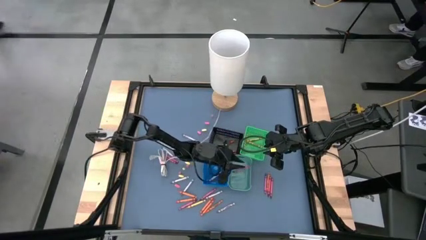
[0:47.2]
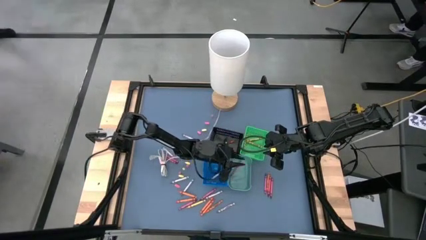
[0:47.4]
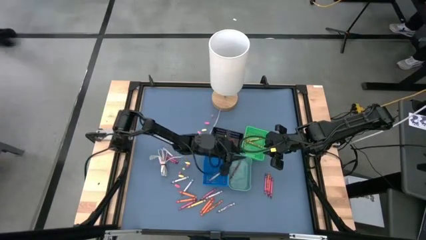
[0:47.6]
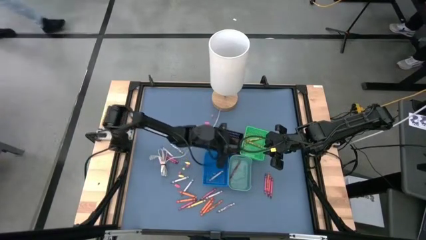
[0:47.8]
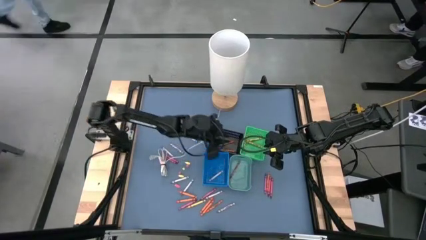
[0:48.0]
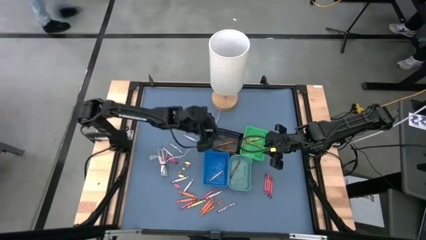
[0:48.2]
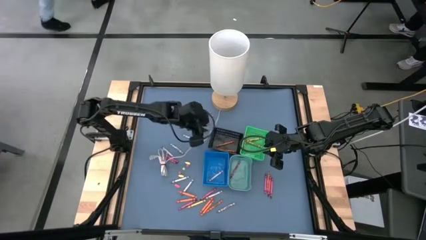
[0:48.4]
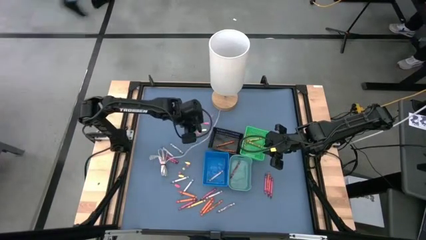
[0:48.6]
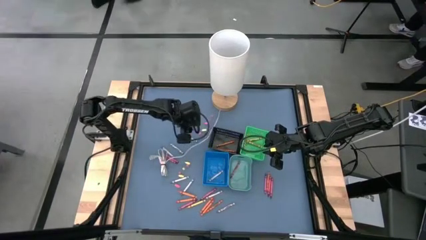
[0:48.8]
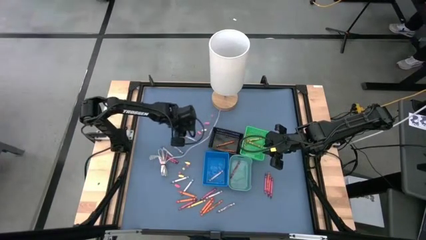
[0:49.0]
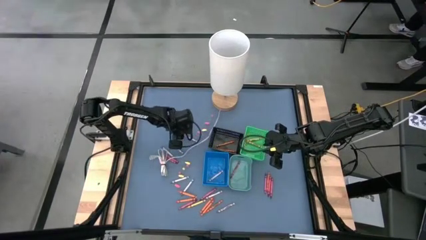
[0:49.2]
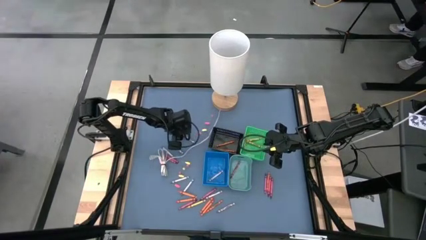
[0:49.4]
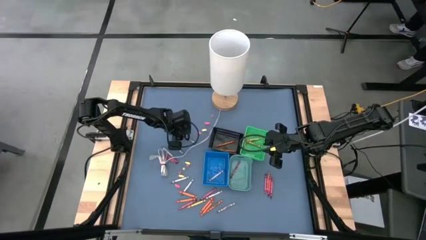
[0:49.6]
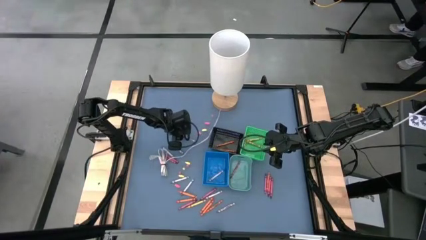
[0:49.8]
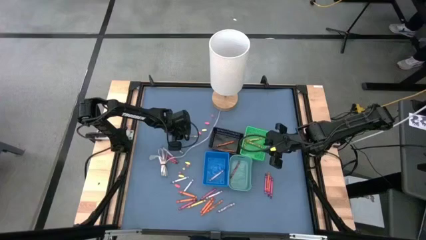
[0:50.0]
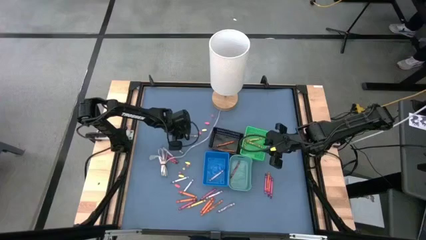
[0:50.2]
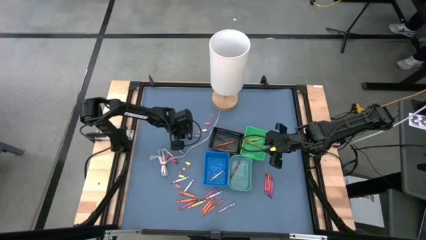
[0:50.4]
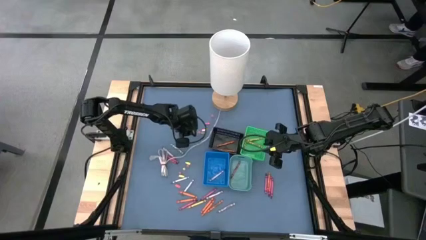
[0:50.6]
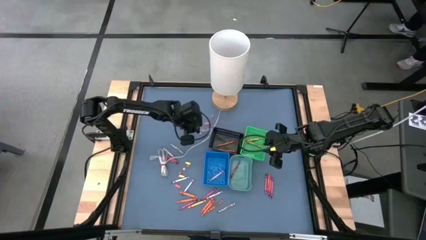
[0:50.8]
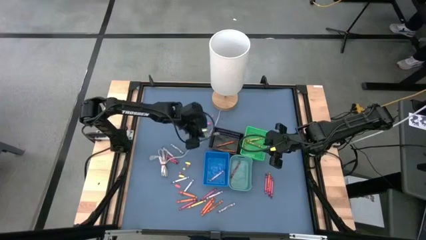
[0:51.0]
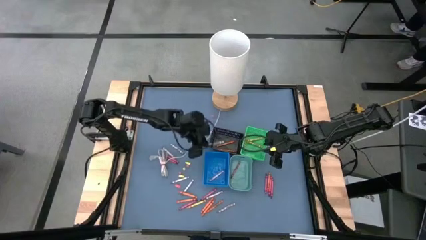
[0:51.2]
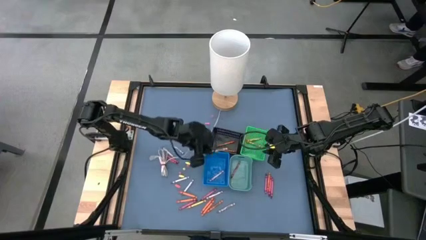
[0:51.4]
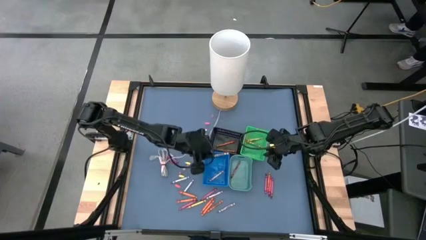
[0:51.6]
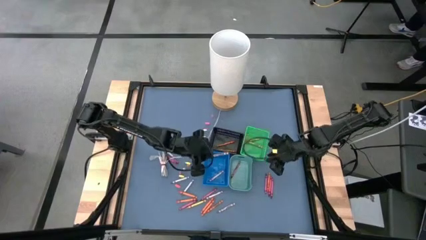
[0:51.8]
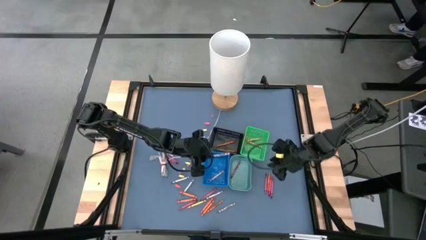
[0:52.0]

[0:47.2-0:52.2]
Task: Sort crayons
Put the gray crayon into the blue bin

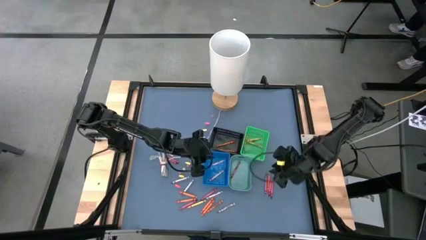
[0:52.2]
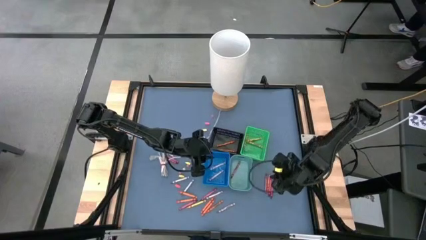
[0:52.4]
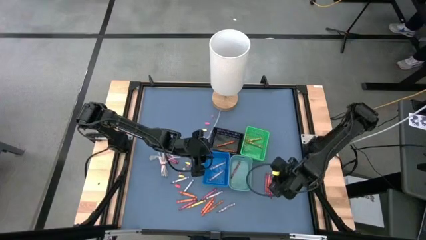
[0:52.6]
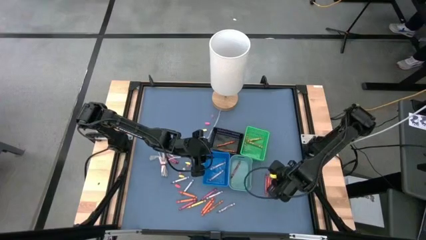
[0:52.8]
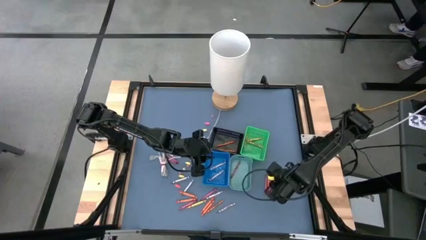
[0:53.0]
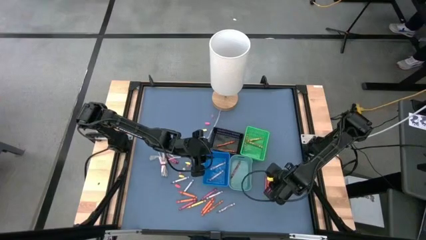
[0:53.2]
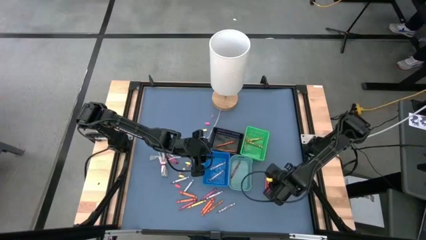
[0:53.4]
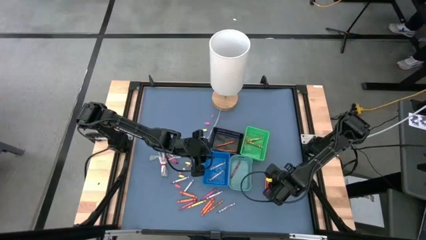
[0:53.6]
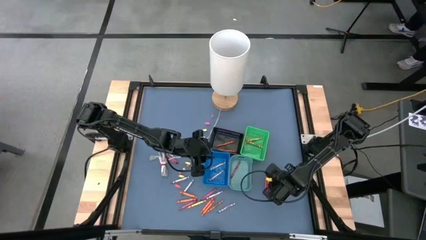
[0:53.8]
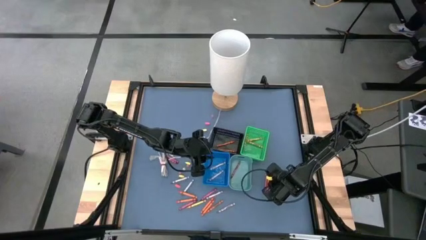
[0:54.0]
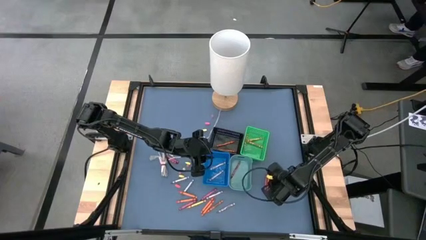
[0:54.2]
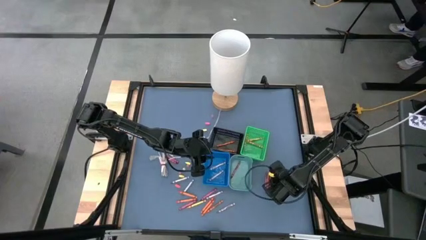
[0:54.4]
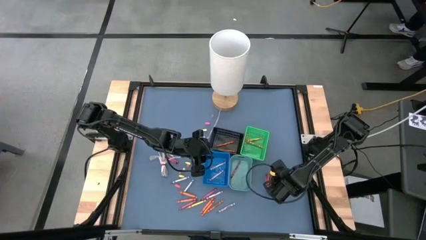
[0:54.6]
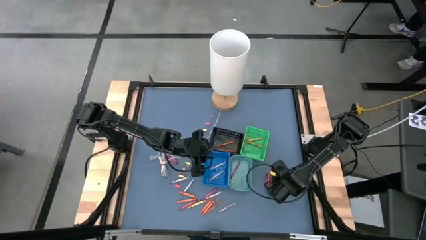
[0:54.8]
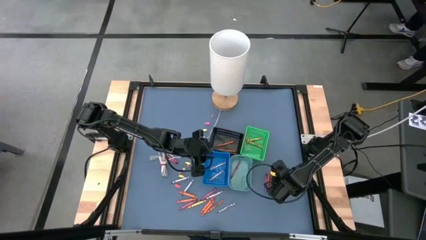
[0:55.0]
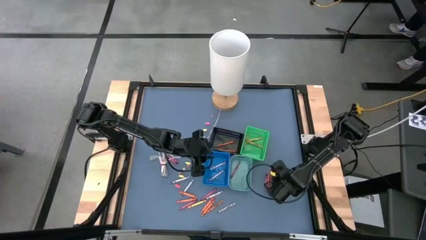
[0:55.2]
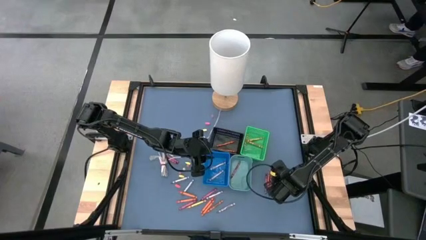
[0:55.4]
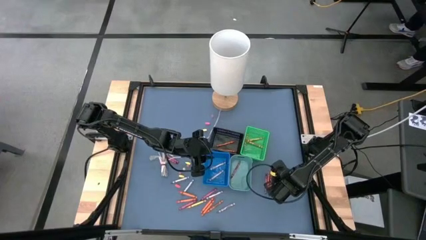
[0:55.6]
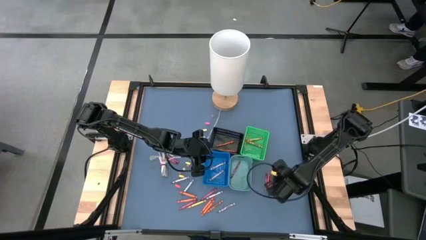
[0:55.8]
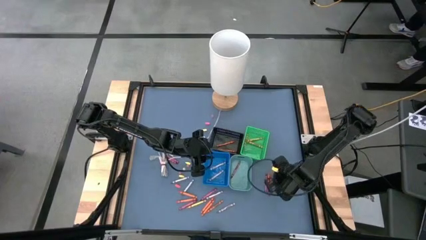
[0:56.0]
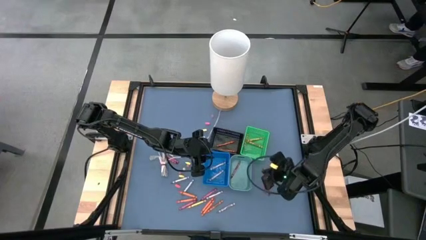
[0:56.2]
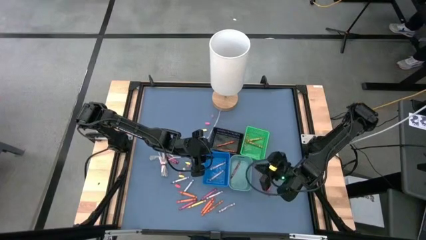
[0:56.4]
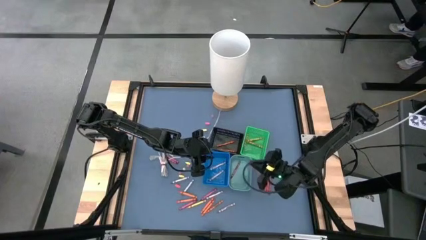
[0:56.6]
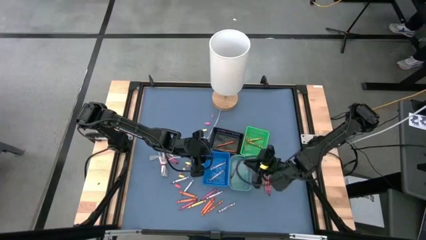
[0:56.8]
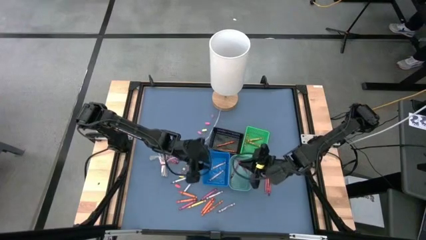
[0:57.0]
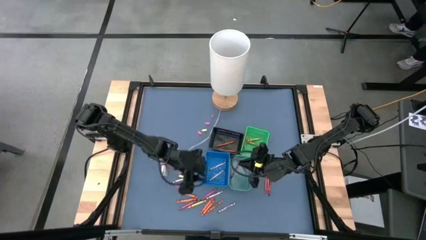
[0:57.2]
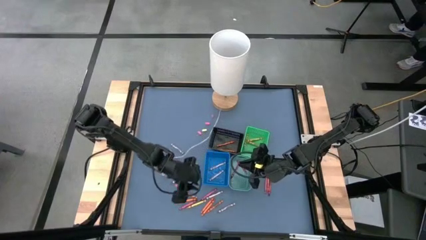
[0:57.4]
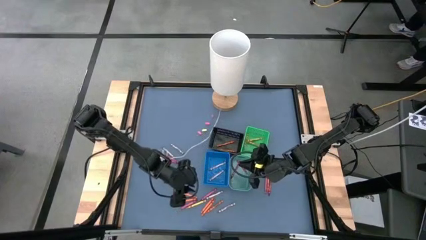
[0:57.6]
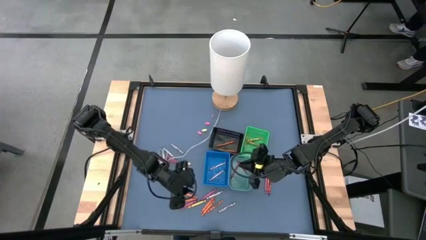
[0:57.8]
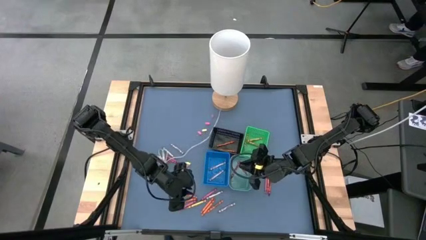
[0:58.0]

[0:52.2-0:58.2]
Put the red crayon into the light green bin

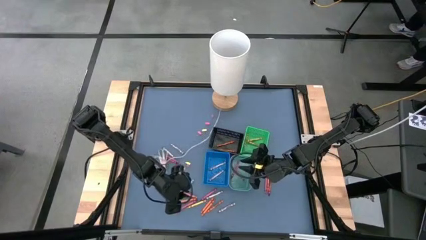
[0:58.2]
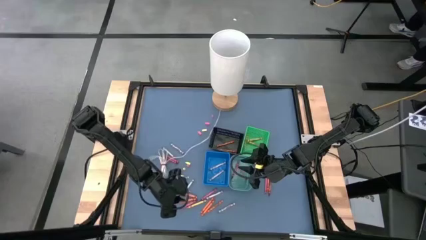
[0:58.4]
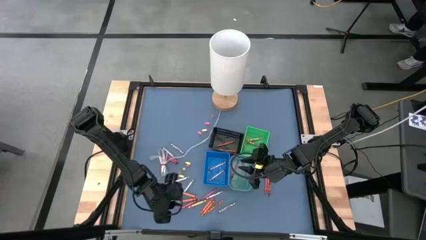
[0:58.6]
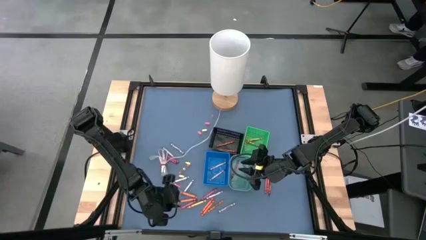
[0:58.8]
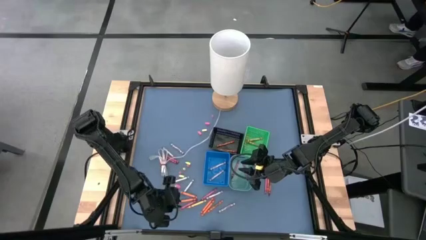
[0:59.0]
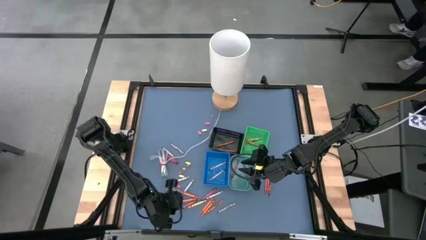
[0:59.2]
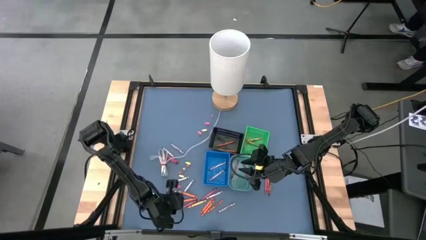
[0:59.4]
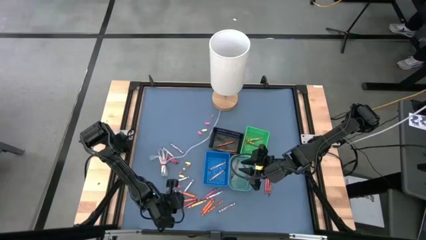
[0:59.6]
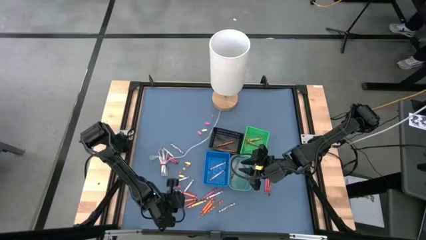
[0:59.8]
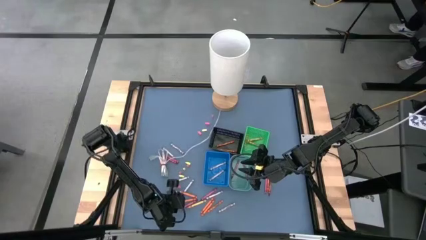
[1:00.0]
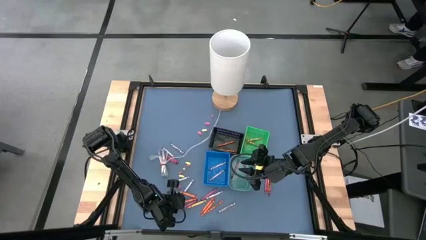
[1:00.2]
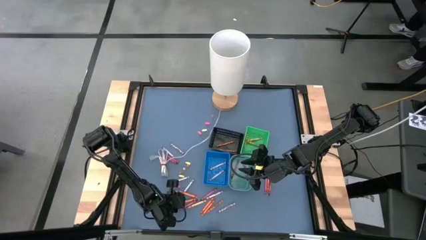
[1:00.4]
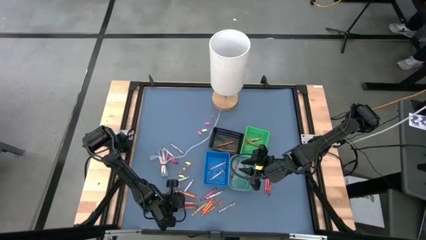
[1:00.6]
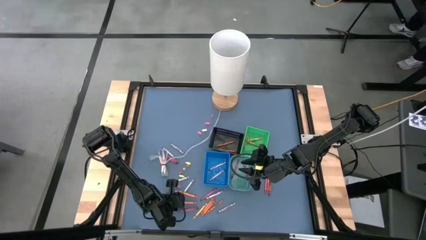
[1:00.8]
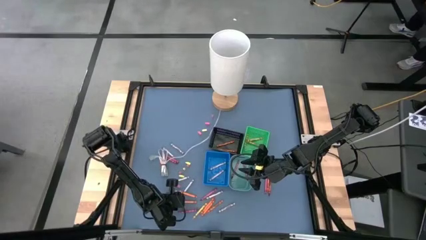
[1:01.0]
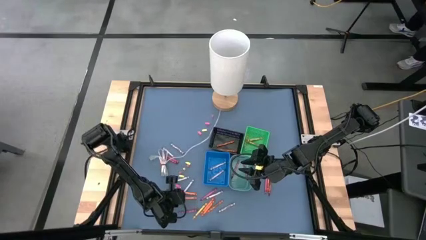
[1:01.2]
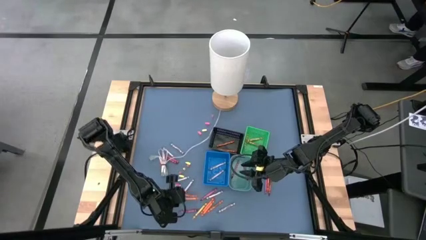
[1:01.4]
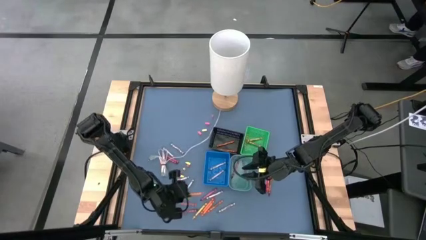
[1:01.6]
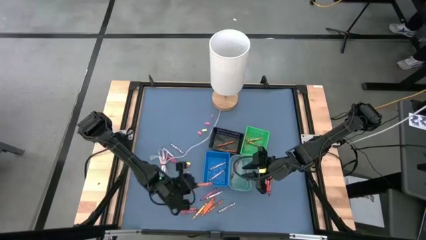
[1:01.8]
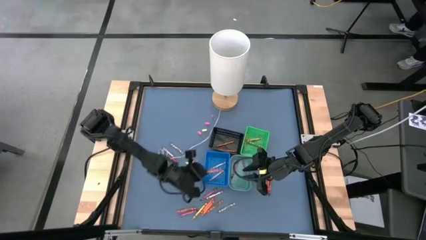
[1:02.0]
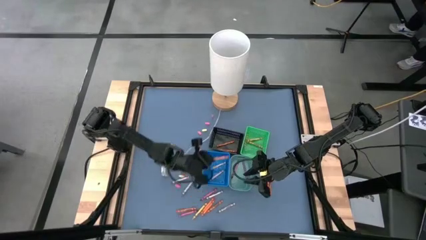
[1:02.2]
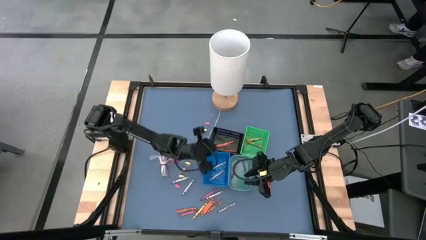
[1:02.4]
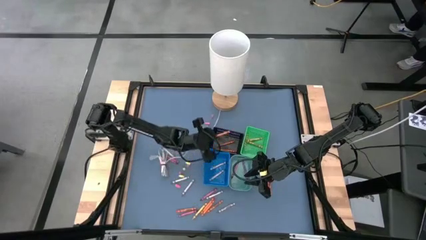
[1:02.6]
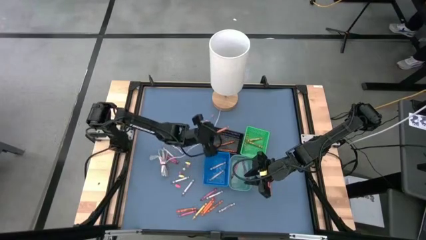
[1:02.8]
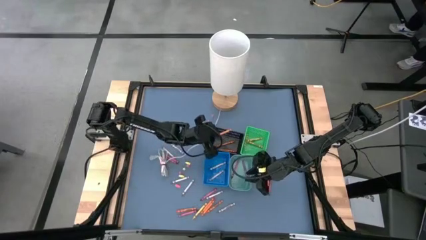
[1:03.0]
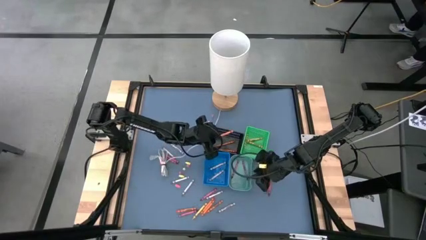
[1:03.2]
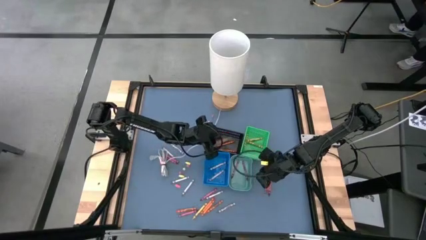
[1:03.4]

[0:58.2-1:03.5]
Put the orange crayon into the black bin
